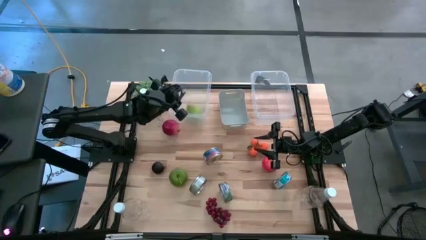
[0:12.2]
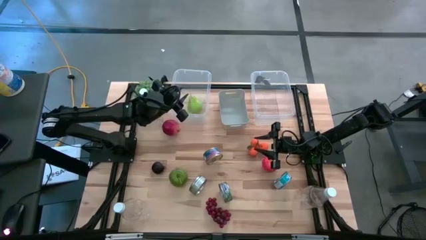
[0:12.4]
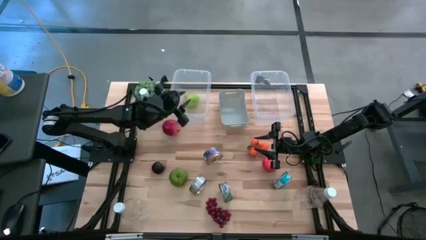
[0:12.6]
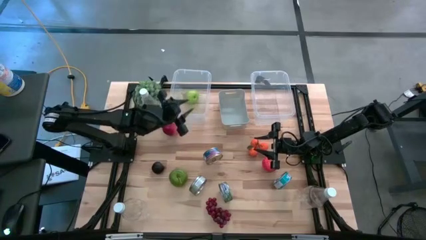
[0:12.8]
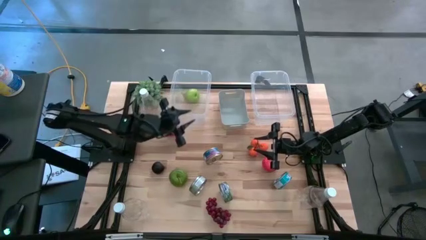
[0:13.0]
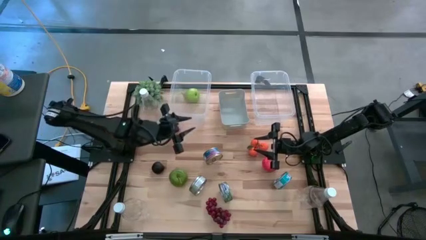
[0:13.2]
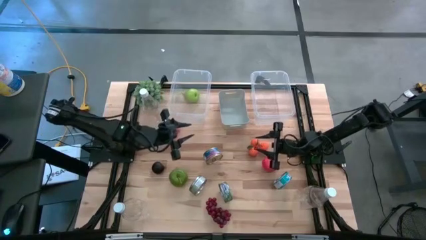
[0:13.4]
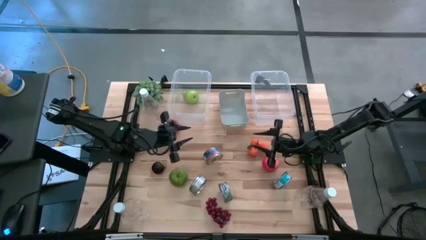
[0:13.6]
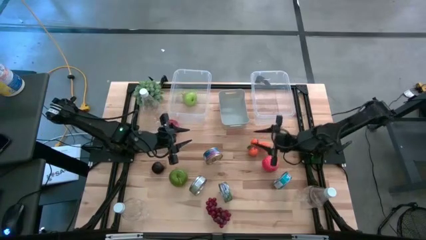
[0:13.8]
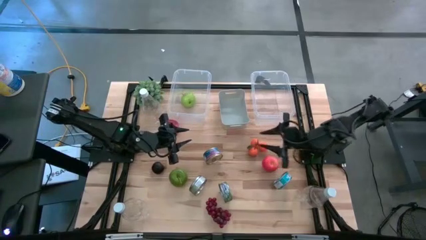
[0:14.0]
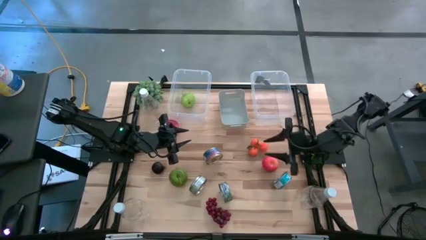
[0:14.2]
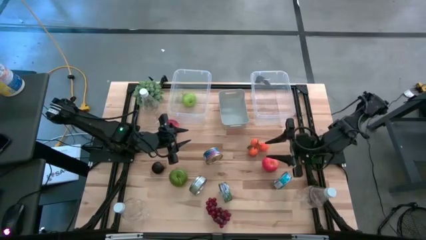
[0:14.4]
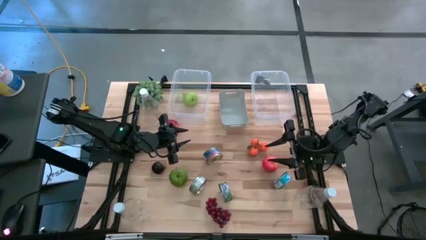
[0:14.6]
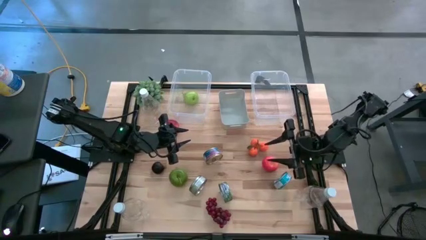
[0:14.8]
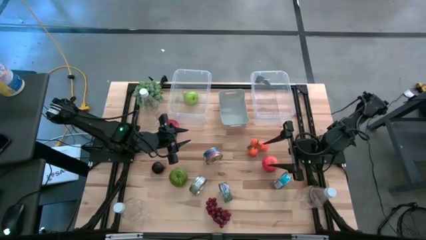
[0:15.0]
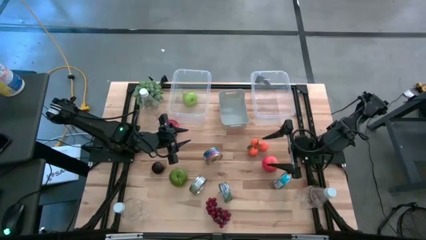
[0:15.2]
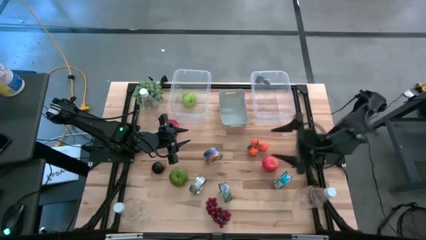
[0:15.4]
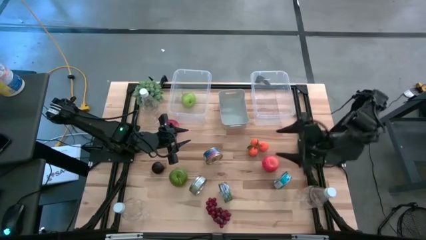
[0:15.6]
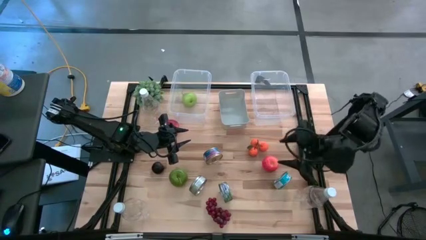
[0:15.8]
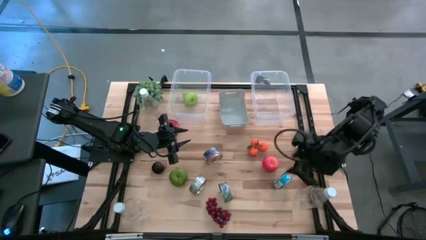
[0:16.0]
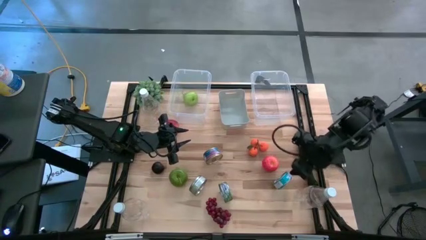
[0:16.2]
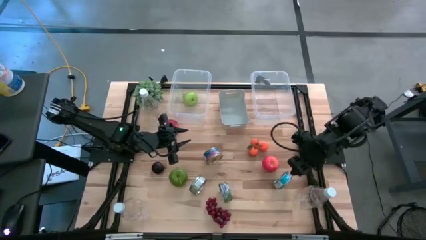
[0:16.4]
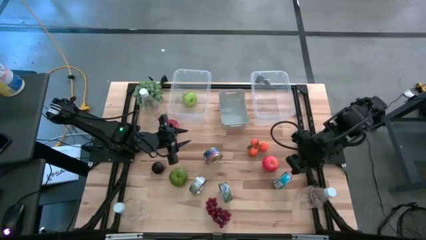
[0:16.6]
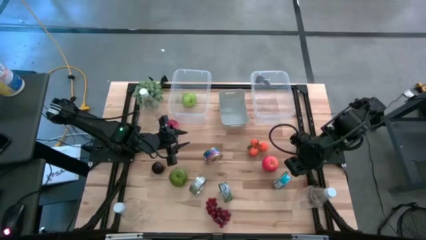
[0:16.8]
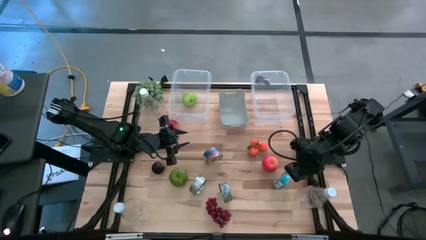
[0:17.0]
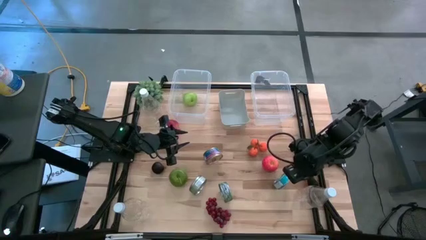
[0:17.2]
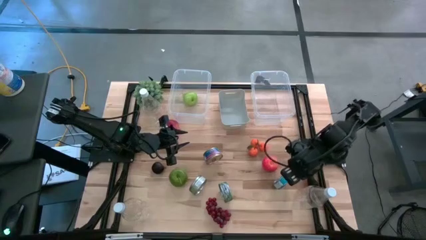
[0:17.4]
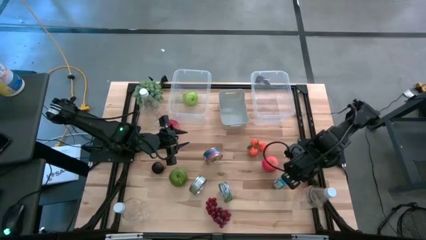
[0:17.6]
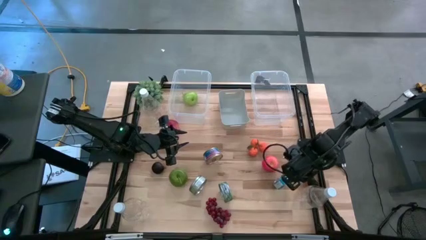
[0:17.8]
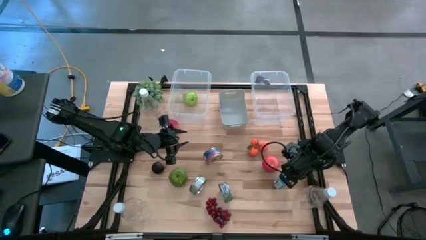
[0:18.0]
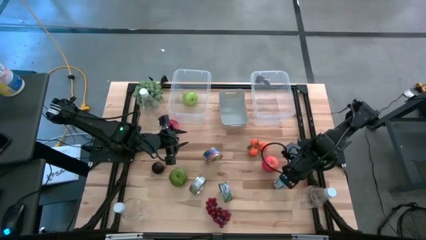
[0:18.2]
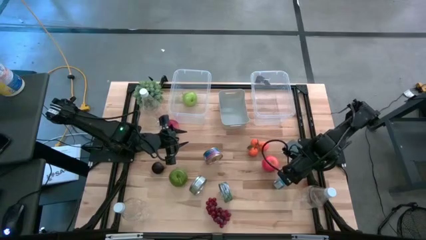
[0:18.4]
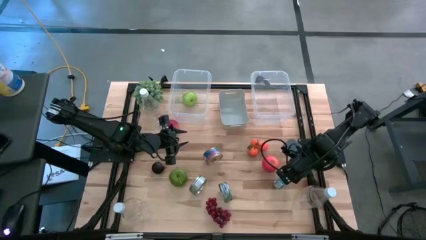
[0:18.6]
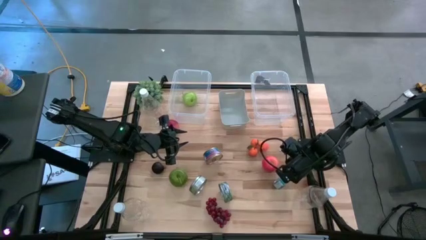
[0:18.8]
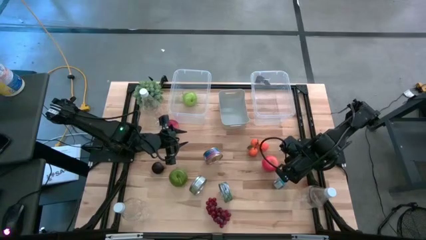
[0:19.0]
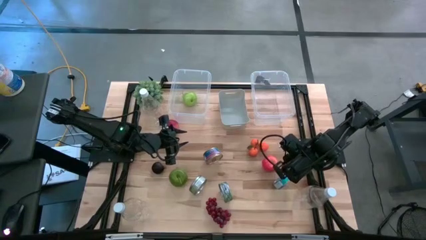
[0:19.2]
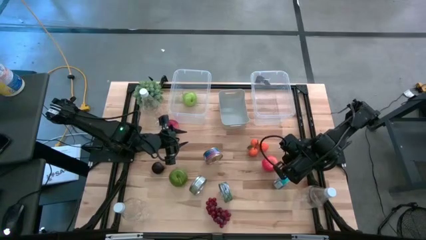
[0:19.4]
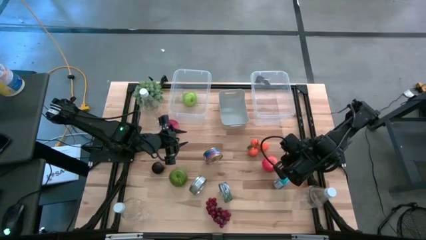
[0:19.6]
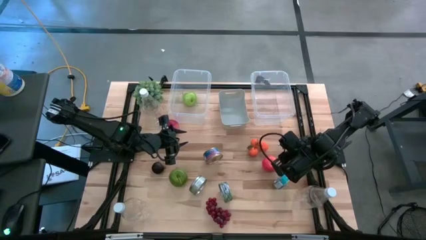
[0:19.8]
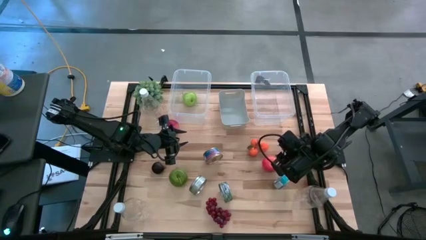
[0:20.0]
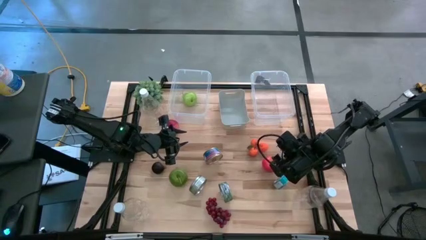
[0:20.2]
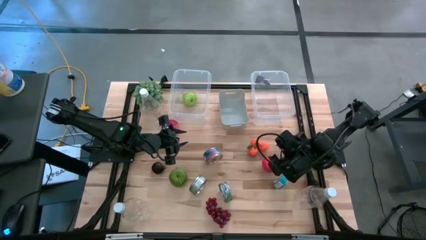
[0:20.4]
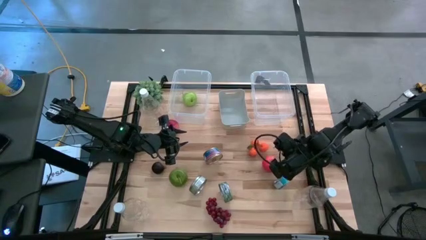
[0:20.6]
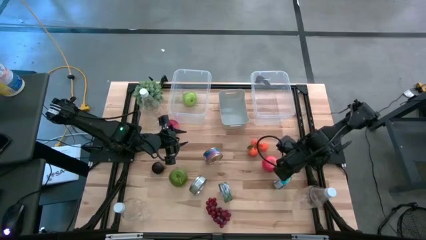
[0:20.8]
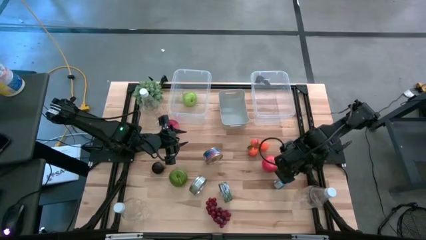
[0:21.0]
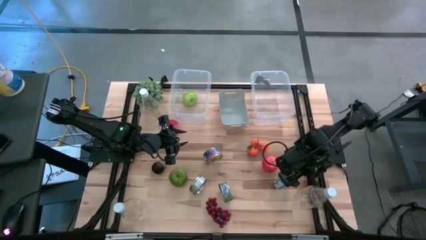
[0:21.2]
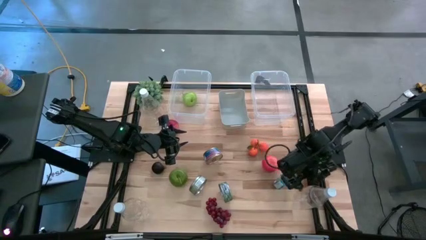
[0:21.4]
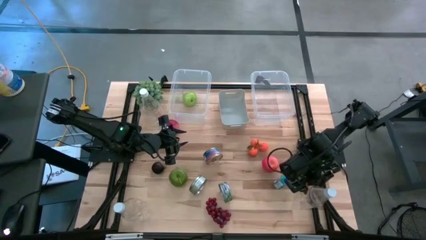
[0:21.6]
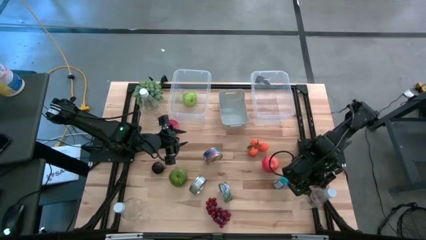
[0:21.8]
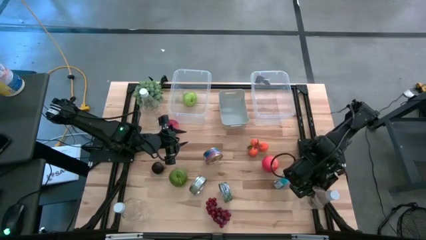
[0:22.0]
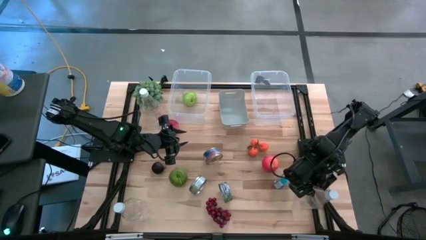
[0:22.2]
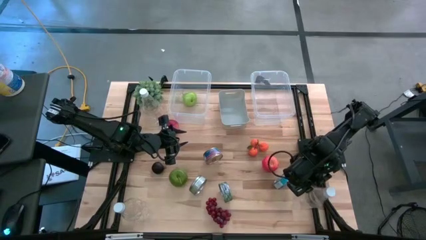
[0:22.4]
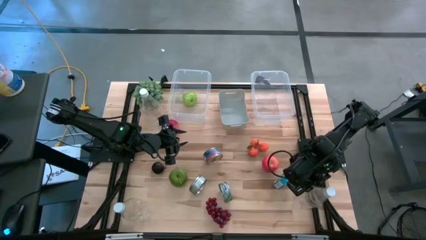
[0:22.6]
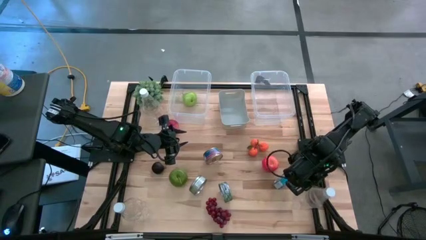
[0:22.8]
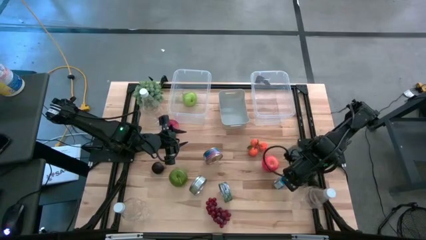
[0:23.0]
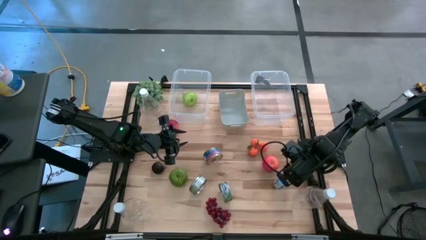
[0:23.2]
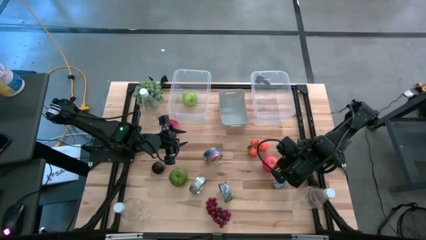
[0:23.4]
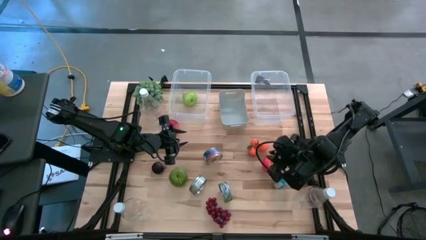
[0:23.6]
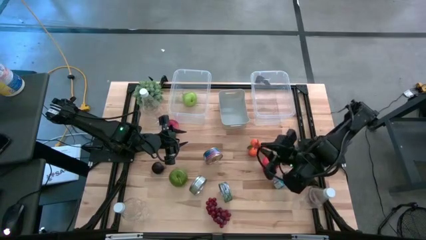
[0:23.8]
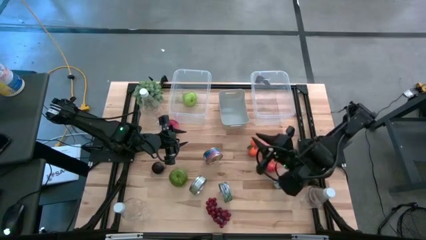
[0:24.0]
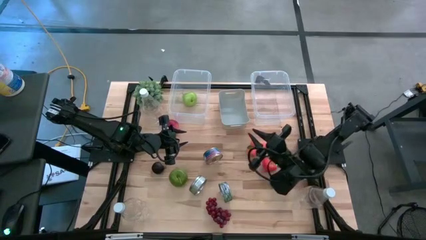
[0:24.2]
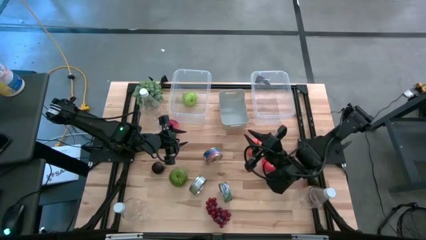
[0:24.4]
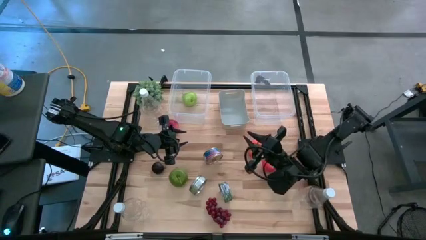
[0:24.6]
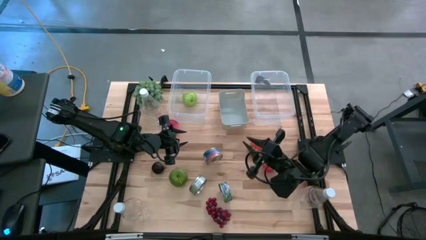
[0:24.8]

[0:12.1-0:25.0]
Task: Pick & Place Food Item
Put the bottom right plastic bottle into the right transparent bin
